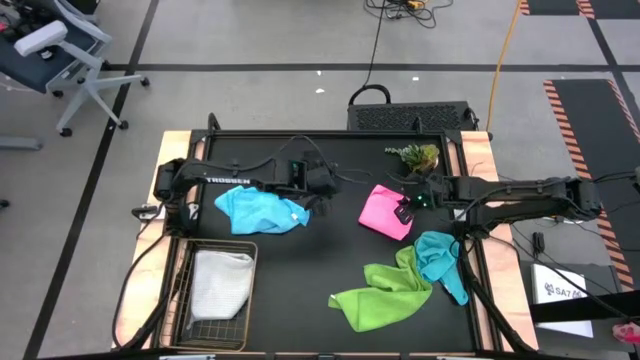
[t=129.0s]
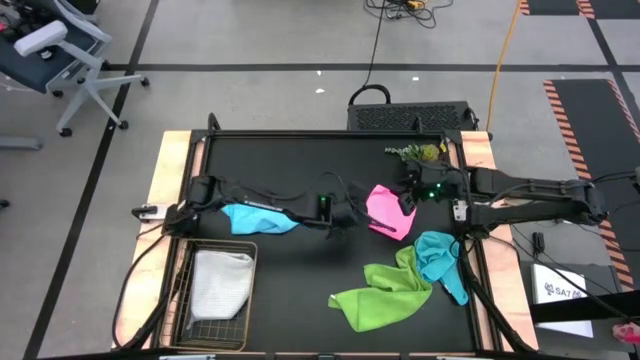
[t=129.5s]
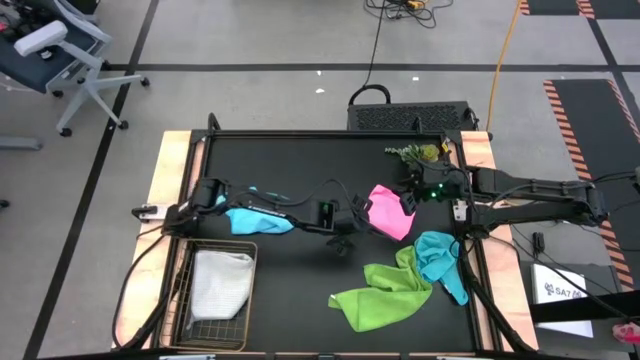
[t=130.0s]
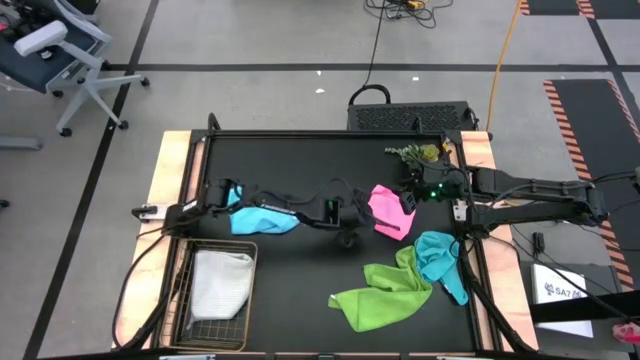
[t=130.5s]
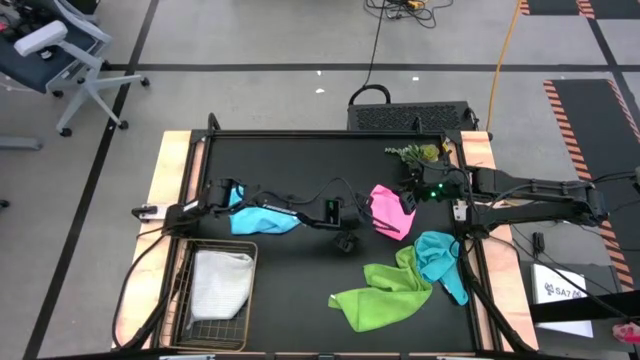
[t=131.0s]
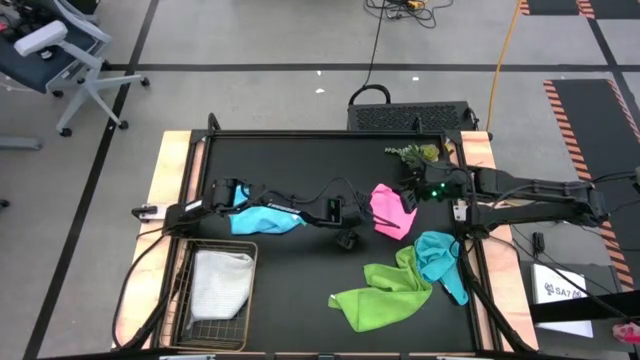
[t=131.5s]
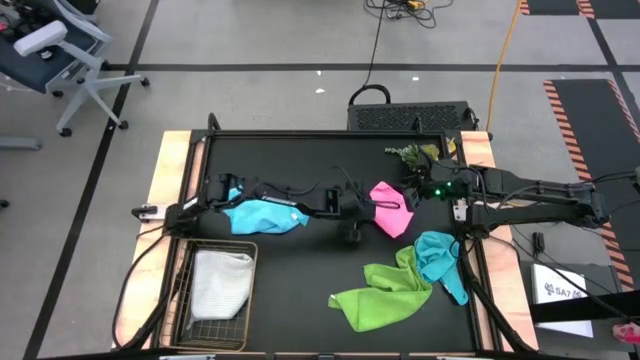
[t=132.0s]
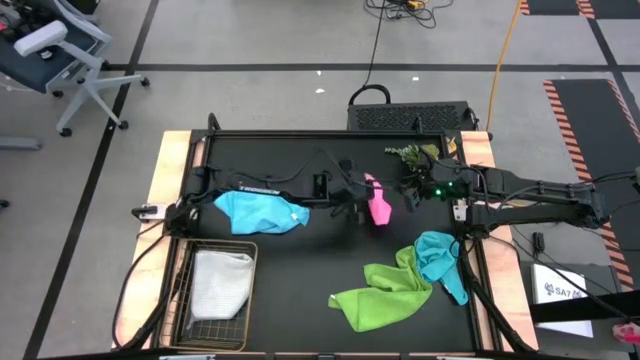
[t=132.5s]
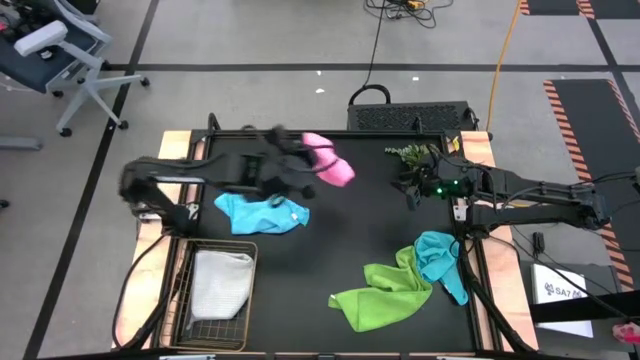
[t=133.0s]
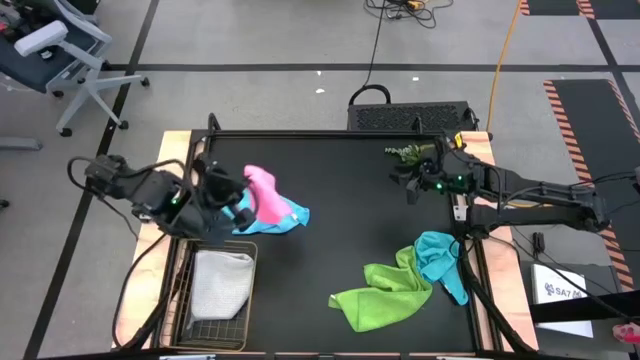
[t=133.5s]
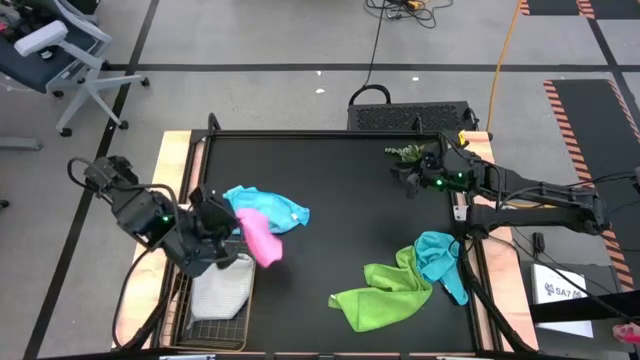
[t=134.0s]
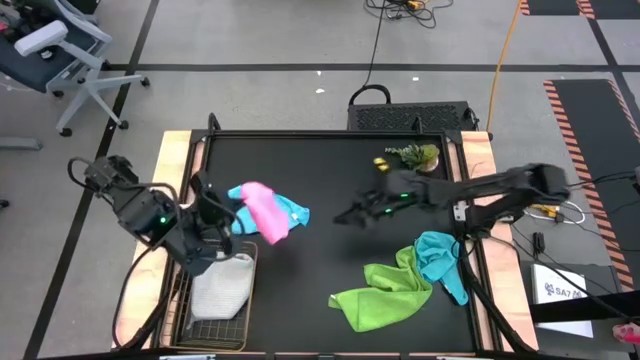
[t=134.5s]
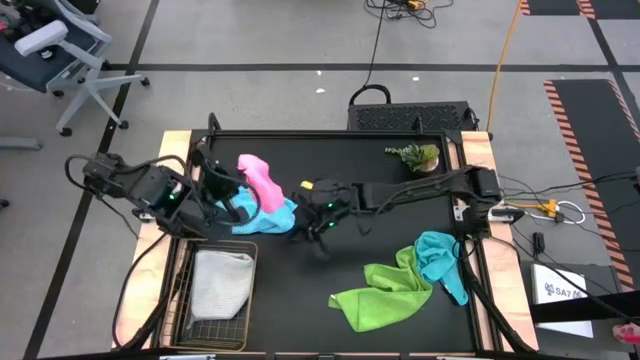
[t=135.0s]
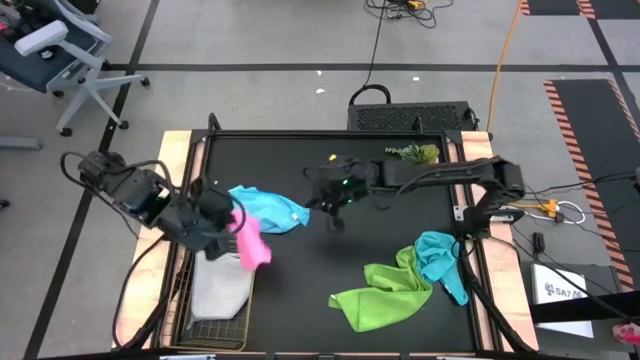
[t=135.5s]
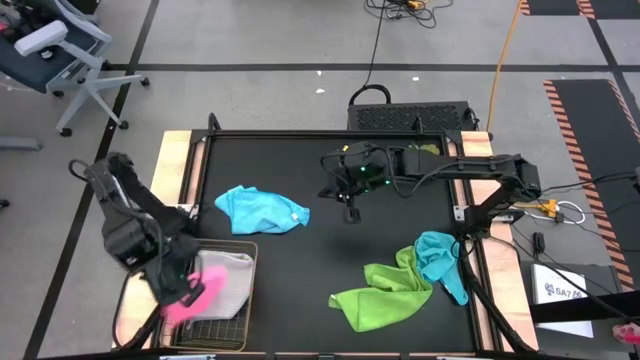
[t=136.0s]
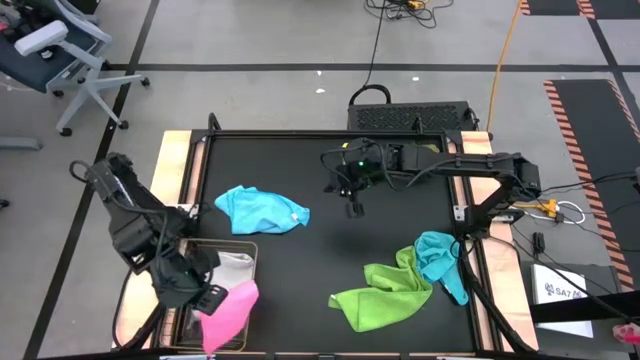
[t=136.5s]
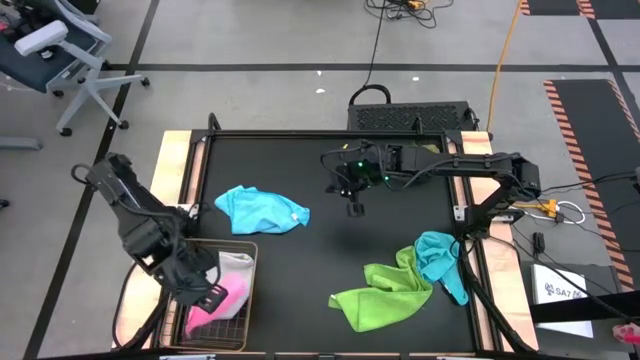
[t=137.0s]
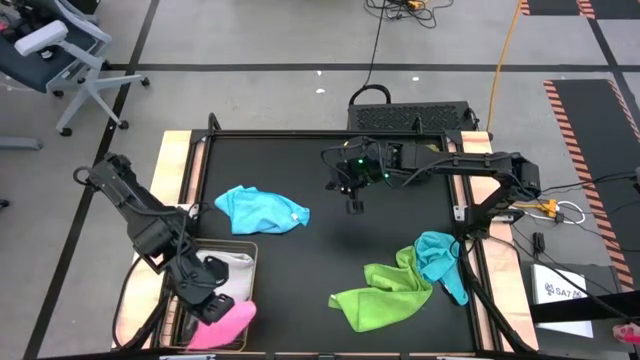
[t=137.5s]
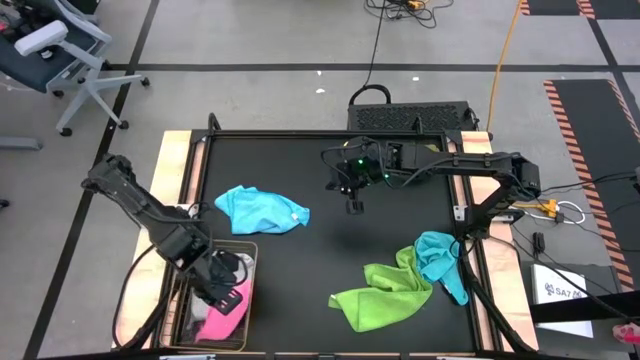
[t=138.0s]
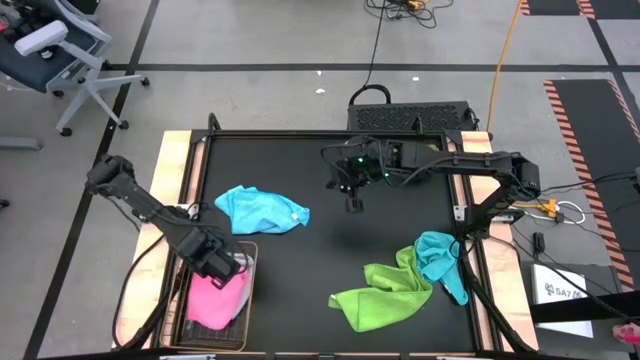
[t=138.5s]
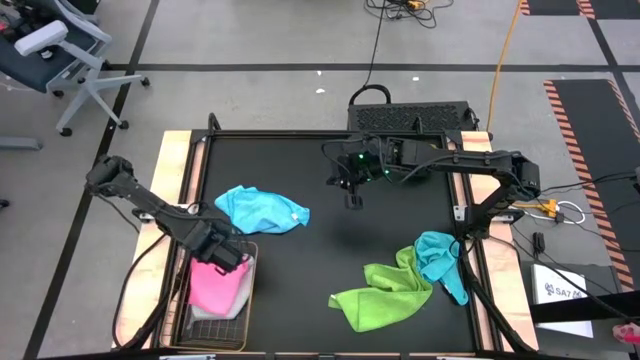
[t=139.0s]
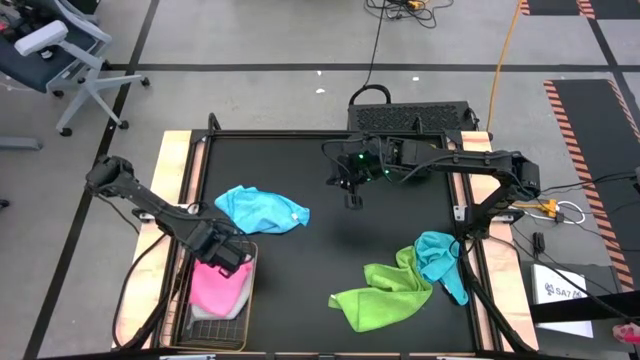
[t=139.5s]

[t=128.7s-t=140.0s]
Task: Fold microfiber towels
Put the folded pink microfiber cloth into the wire basket

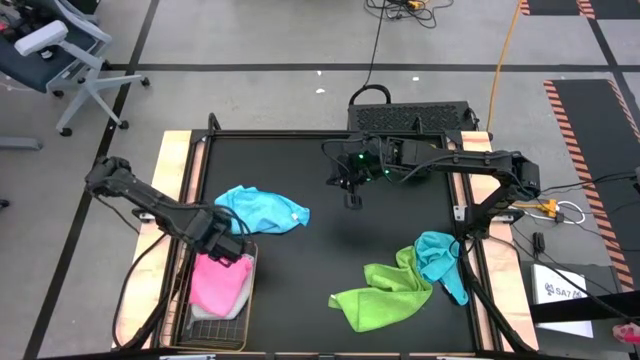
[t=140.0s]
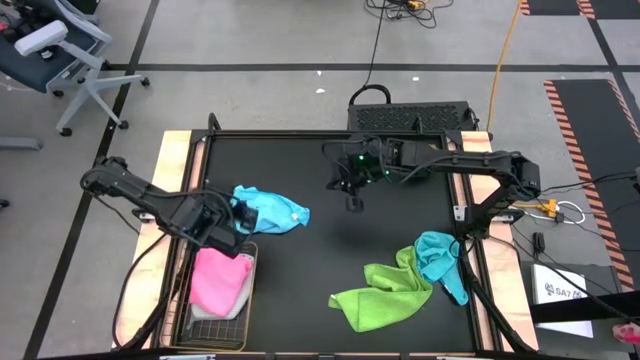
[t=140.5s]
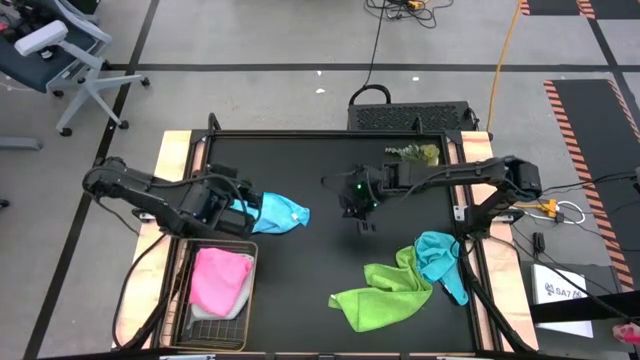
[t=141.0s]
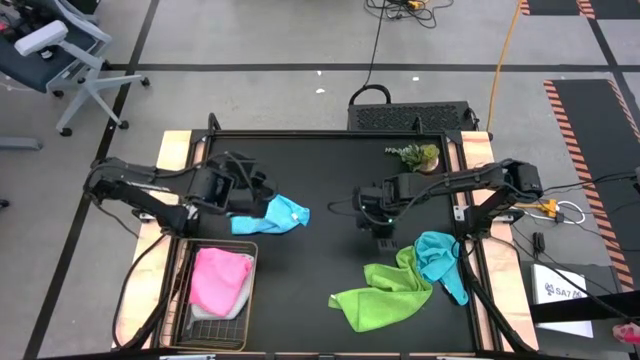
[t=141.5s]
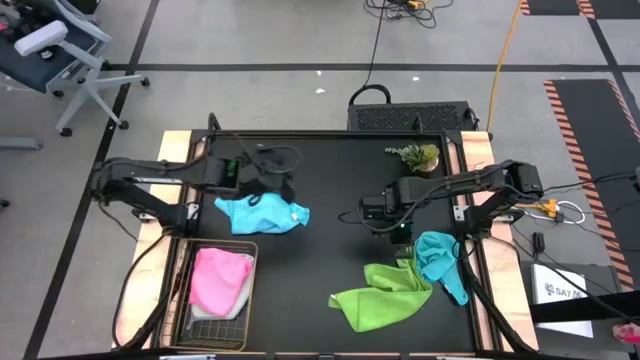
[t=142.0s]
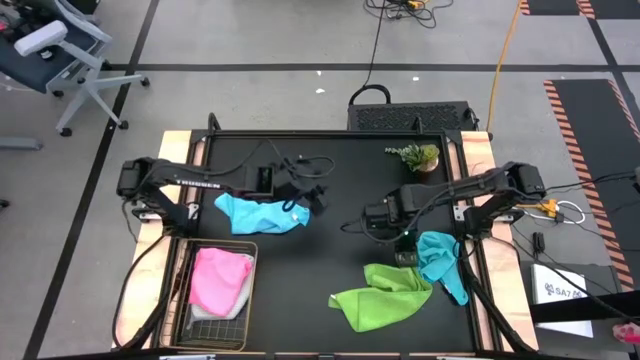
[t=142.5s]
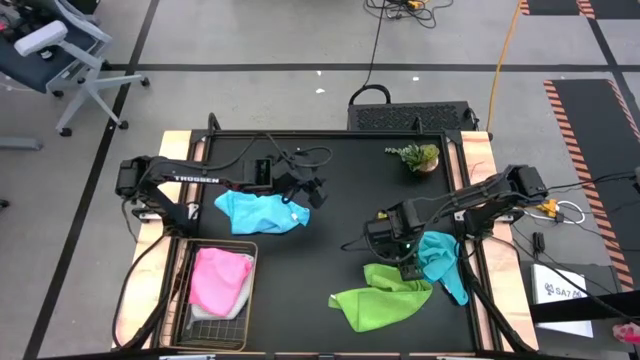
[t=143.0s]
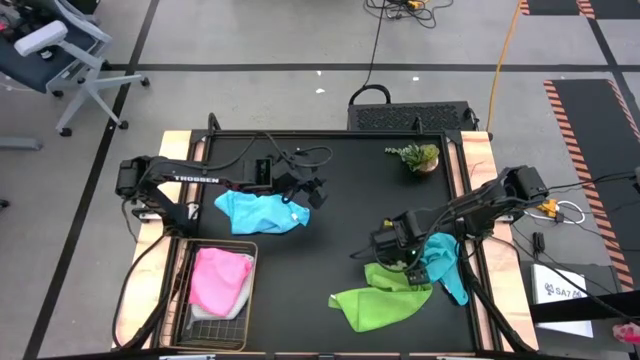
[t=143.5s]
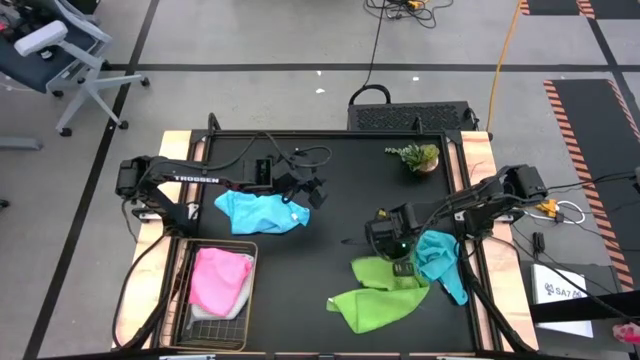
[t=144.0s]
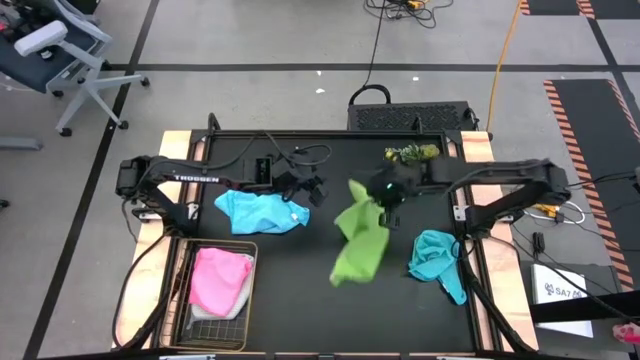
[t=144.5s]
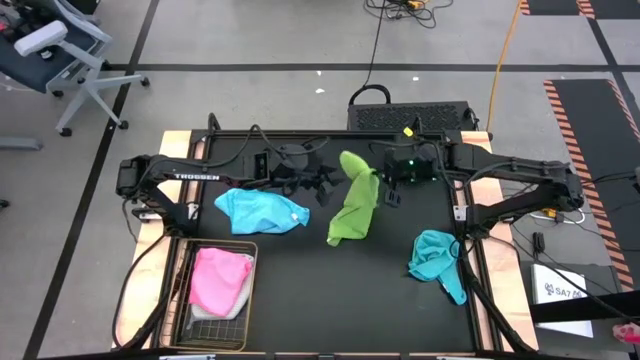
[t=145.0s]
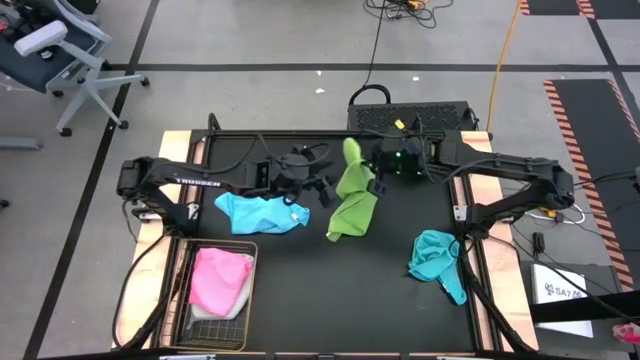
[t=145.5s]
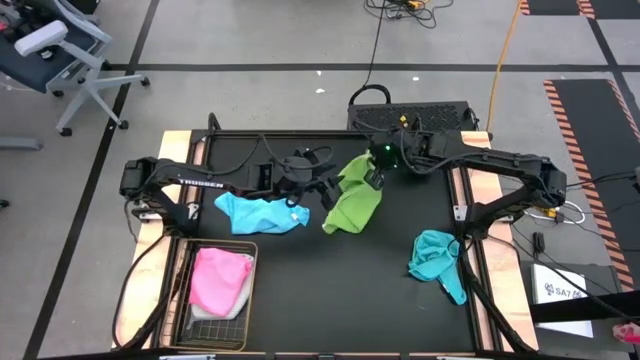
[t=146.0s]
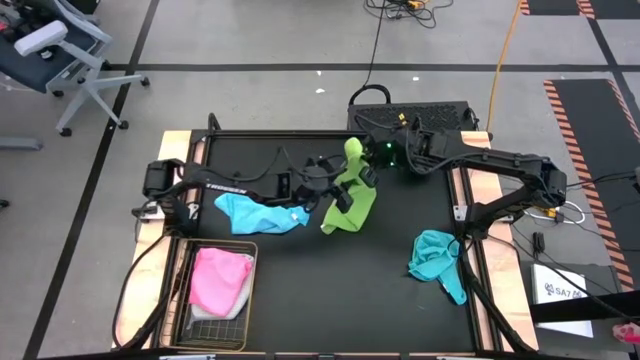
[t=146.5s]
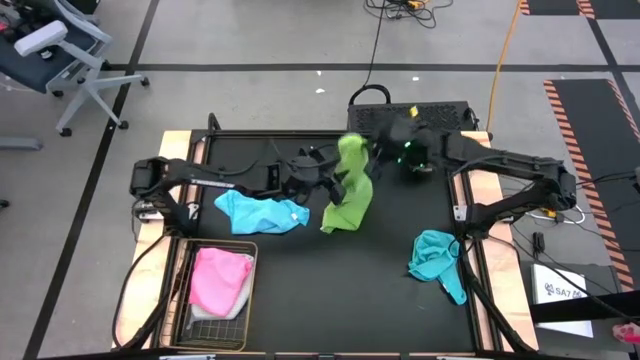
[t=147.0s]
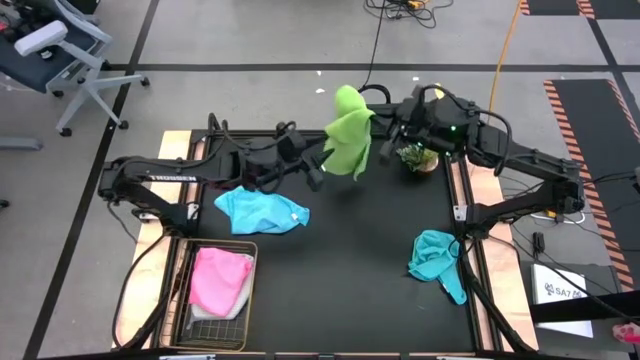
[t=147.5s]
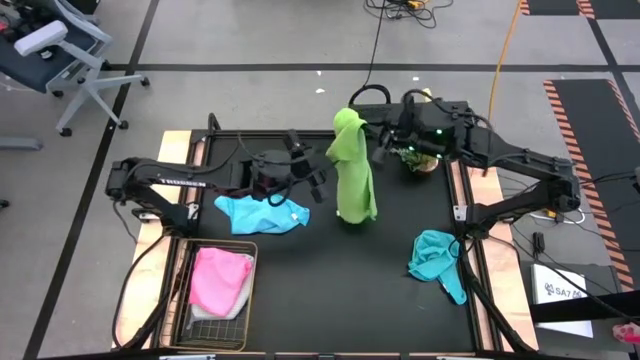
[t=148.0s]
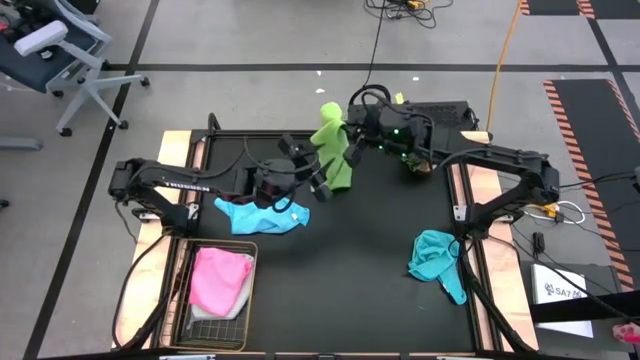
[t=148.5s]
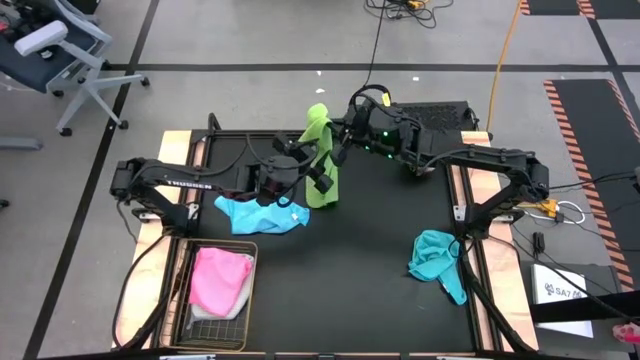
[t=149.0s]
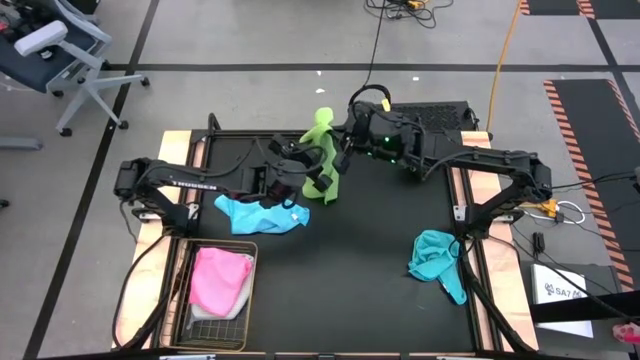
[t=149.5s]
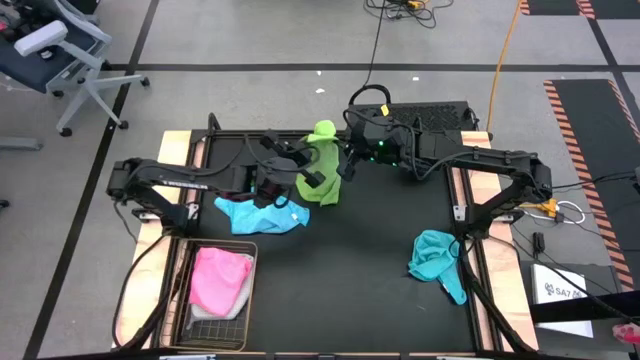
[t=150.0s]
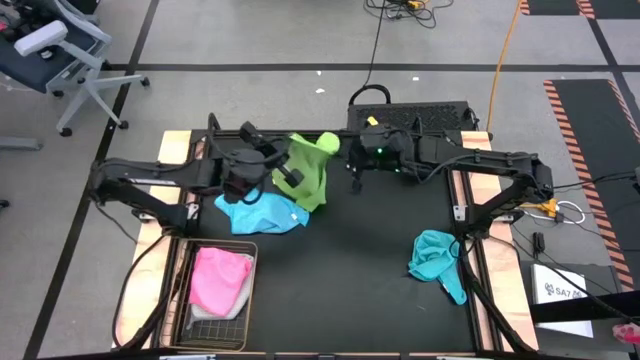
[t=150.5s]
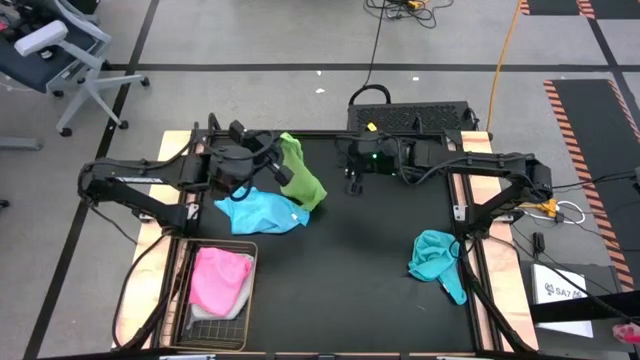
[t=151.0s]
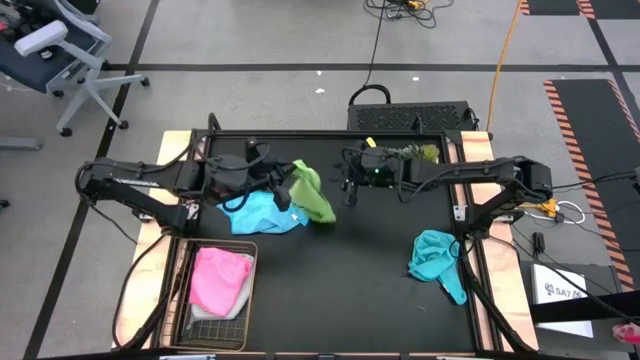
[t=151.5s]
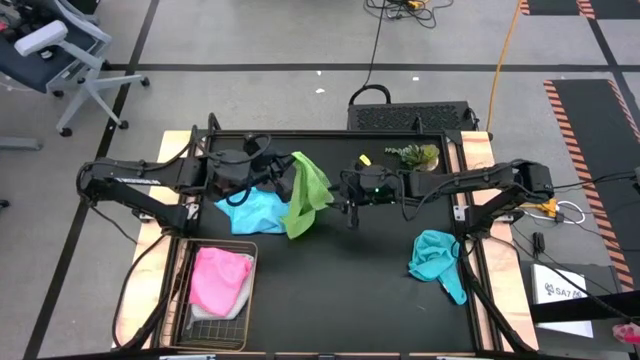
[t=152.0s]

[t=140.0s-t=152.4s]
Fold the green microfiber cloth
